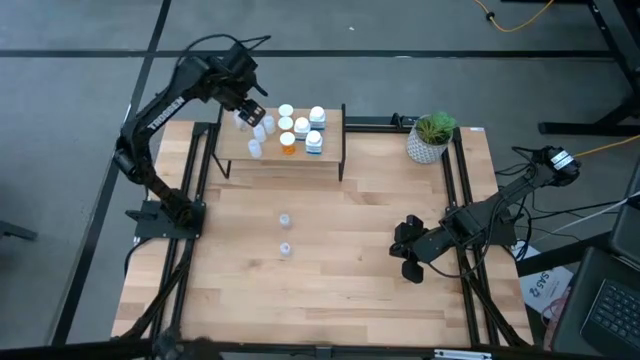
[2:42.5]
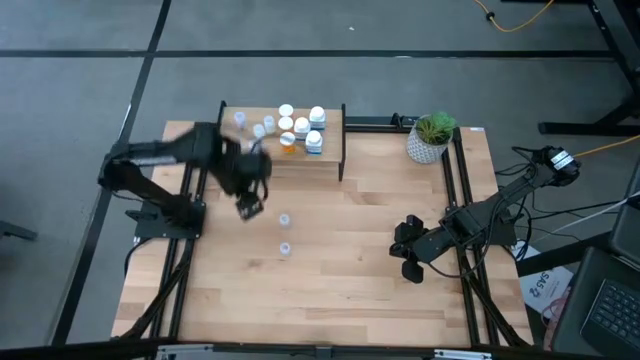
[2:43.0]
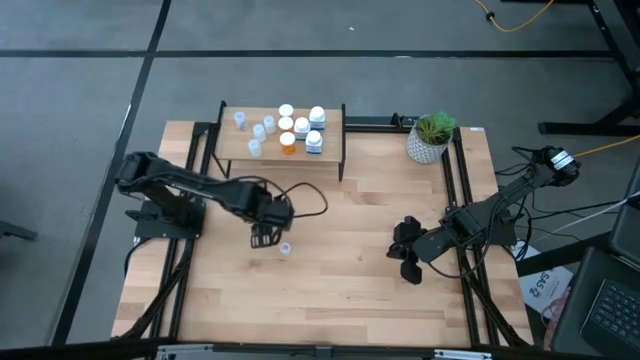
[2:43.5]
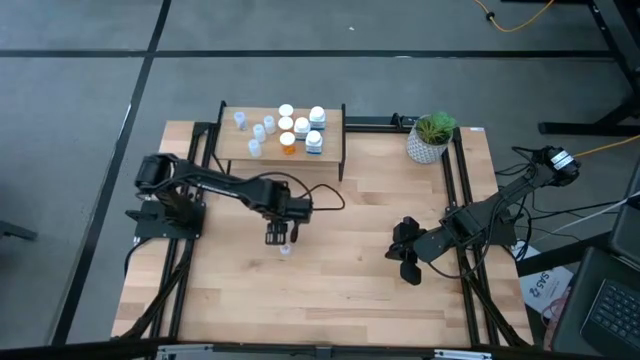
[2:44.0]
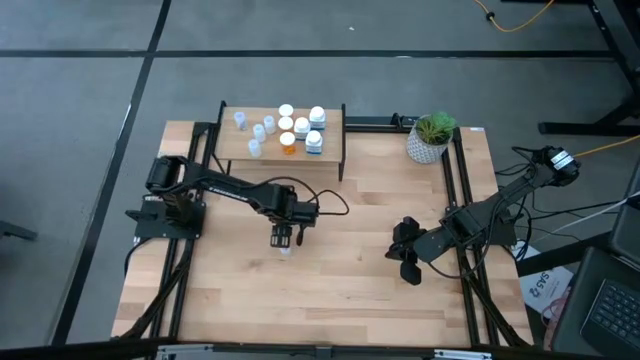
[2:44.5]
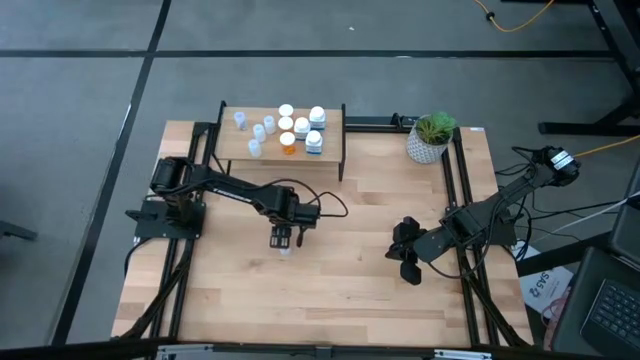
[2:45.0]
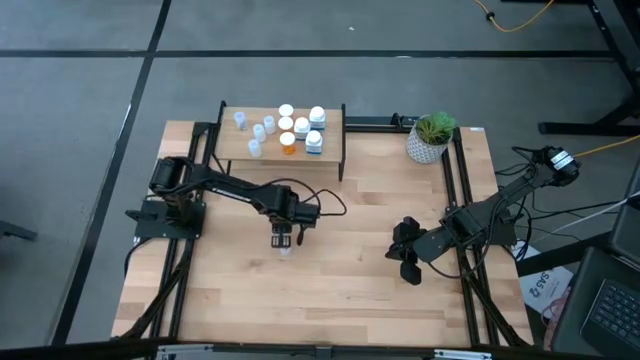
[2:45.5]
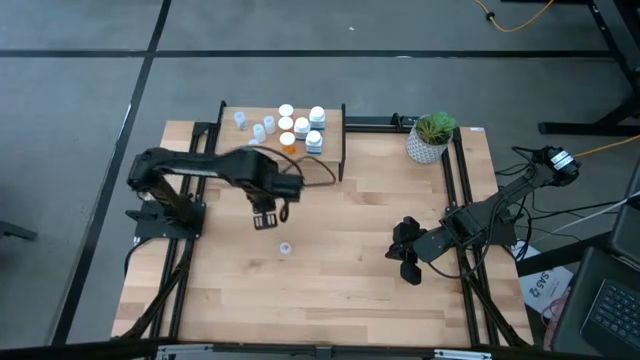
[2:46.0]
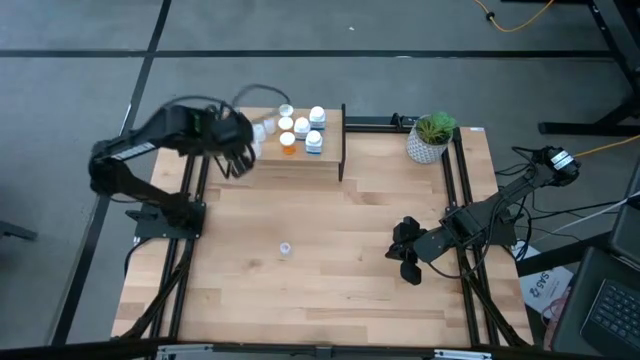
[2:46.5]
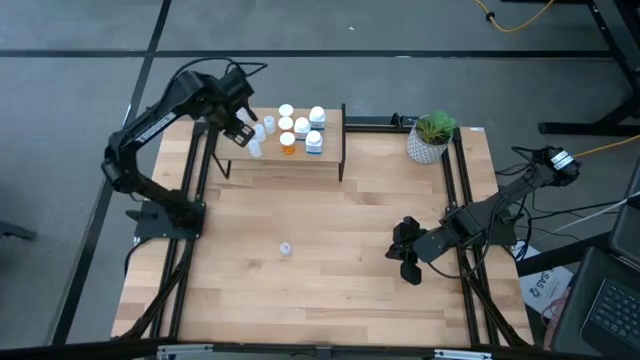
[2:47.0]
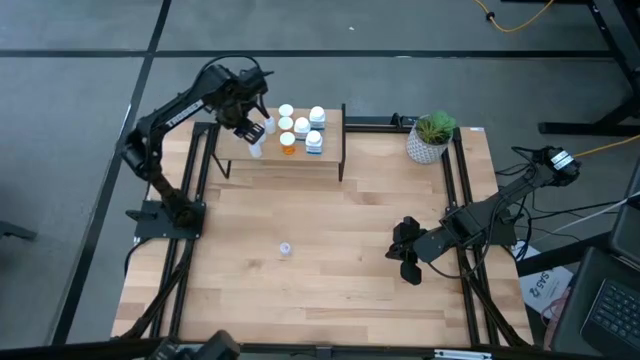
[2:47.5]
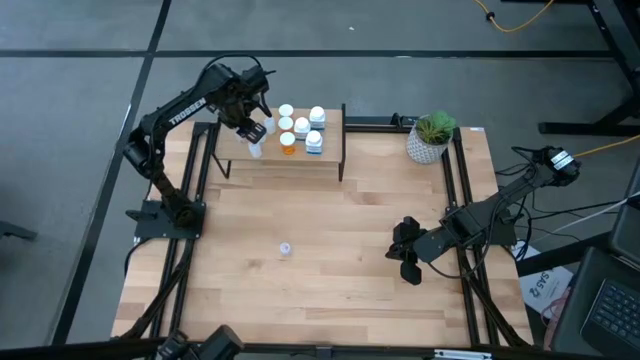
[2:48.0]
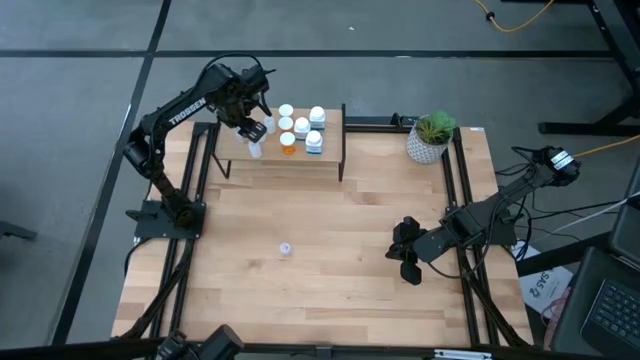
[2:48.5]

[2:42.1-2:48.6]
Task: Pick and place medicine bottles onto shelf by color
Put the transparent pill bottle on the shelf aligned with the transparent pill bottle

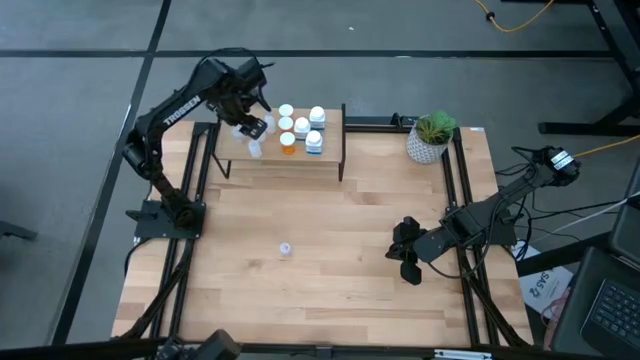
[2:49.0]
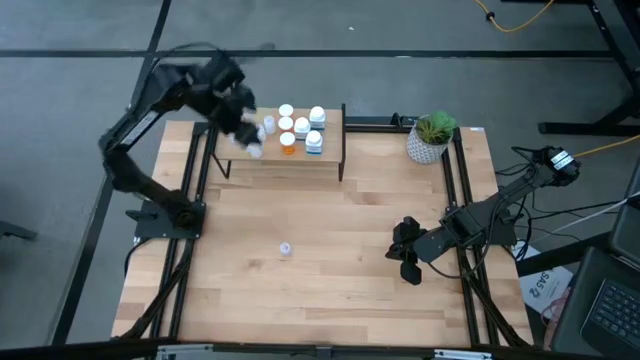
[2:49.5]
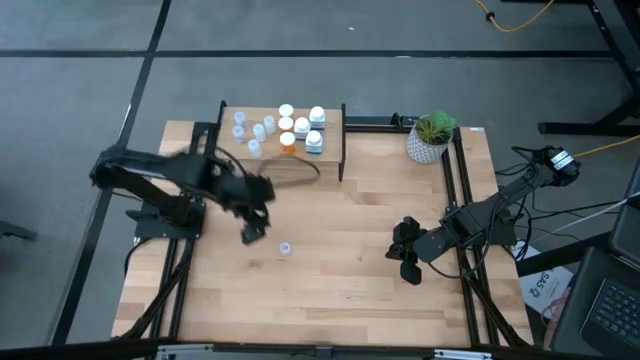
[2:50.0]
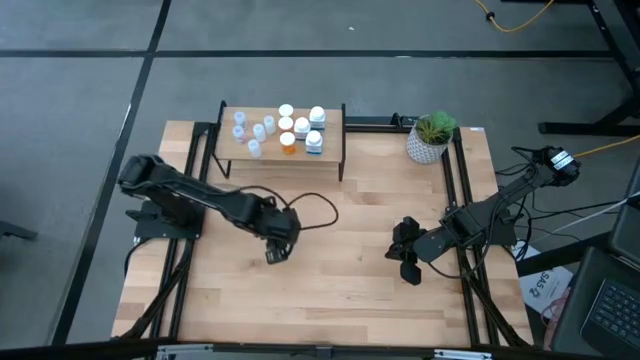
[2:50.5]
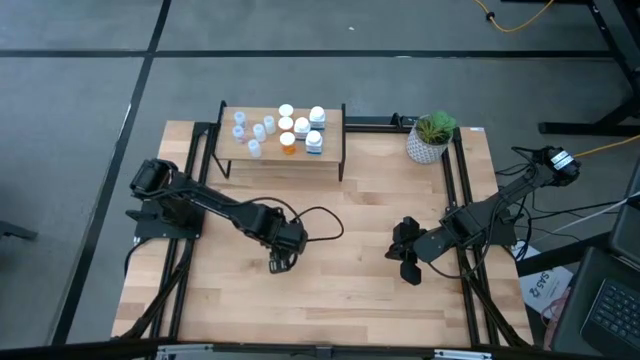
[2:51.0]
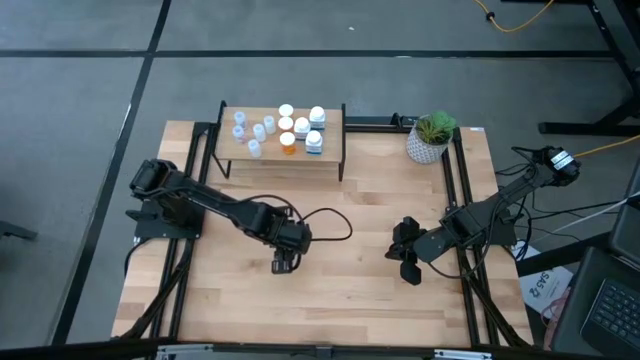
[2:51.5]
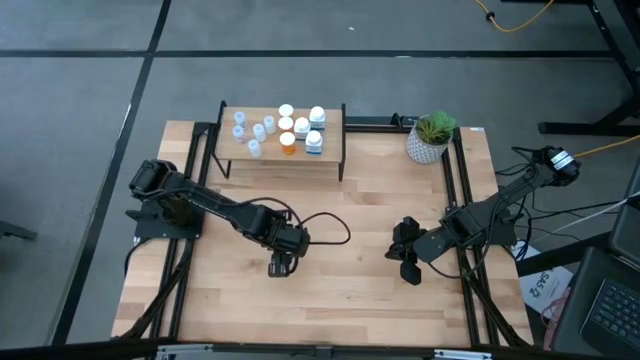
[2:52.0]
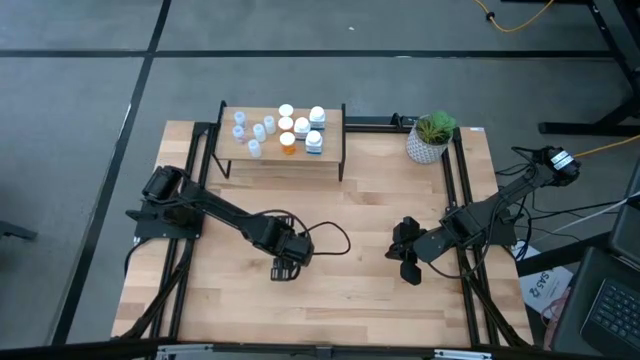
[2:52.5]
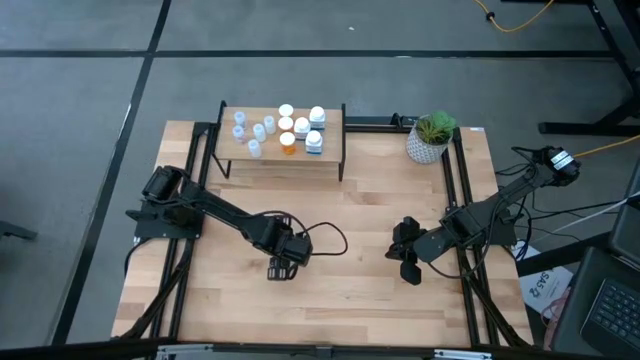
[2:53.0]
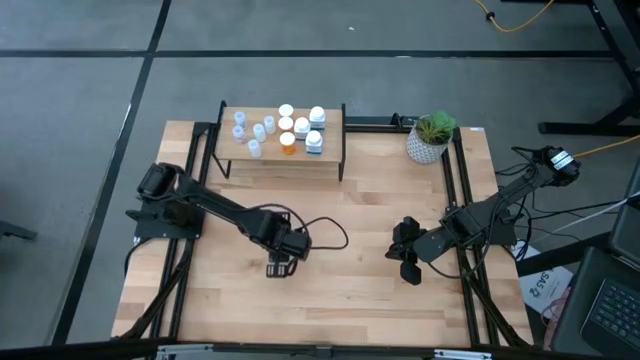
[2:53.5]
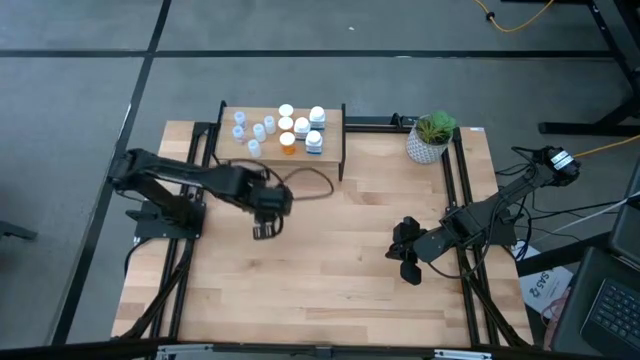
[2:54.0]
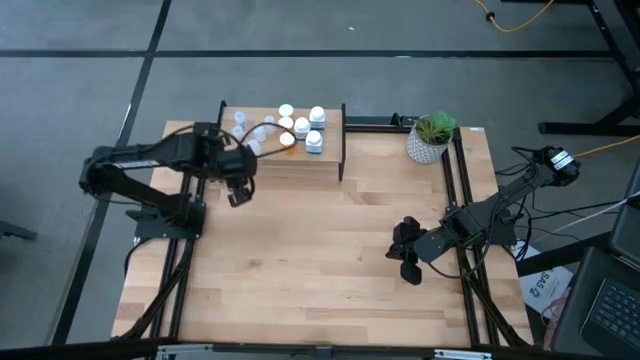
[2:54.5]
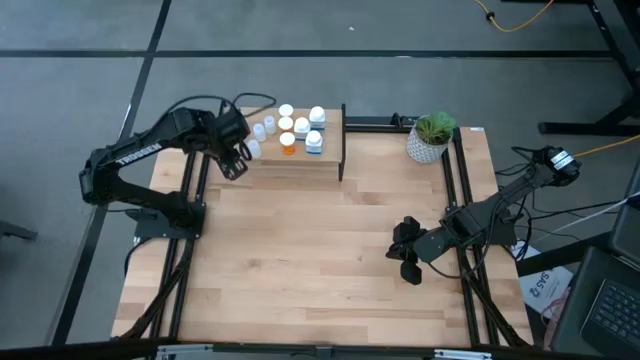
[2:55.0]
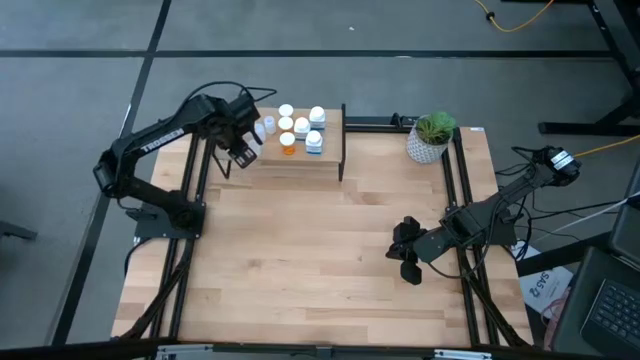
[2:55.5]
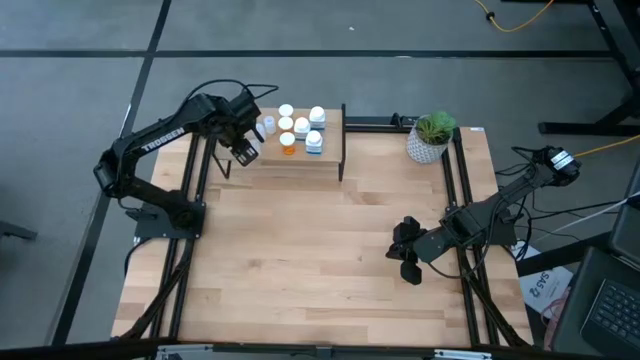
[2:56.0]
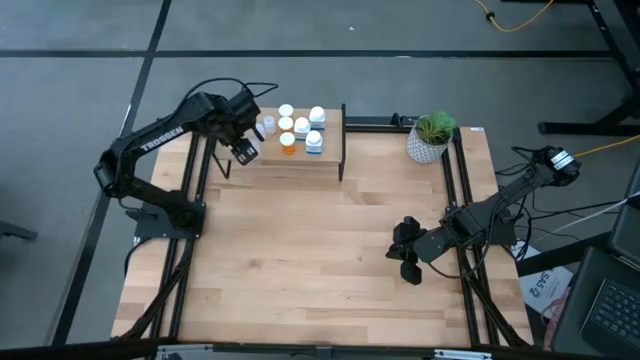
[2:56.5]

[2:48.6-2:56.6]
Put the transparent pill bottle on the shelf aligned with the transparent pill bottles

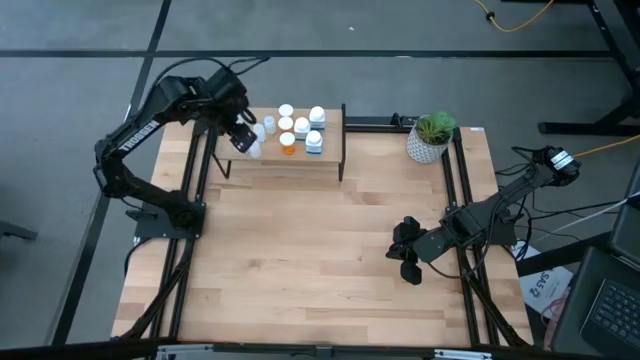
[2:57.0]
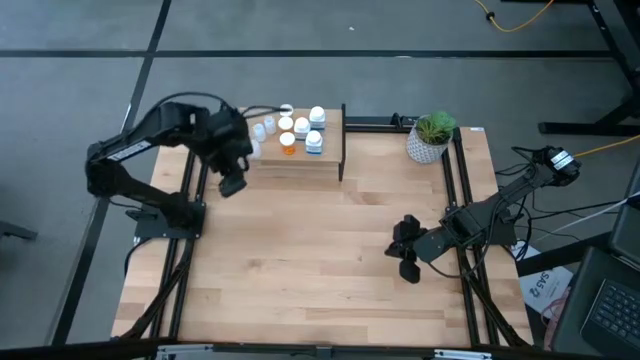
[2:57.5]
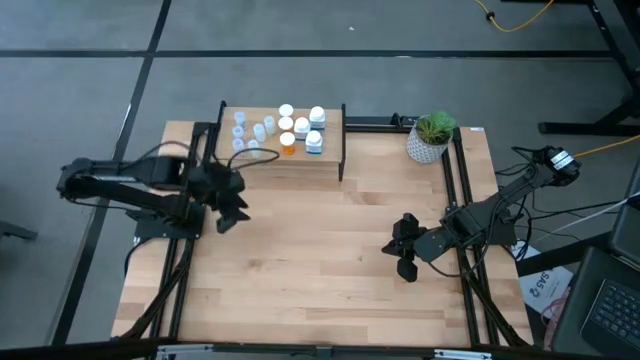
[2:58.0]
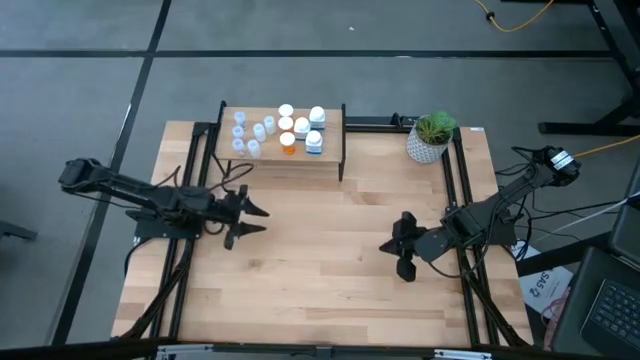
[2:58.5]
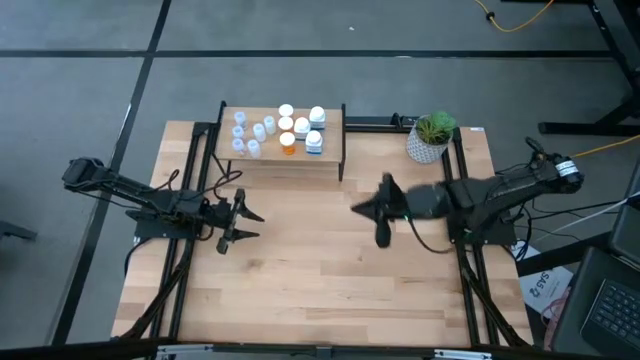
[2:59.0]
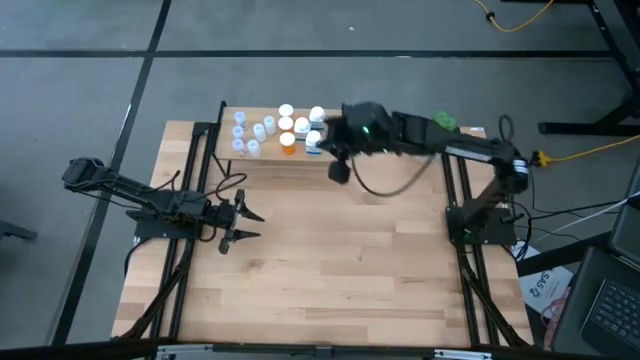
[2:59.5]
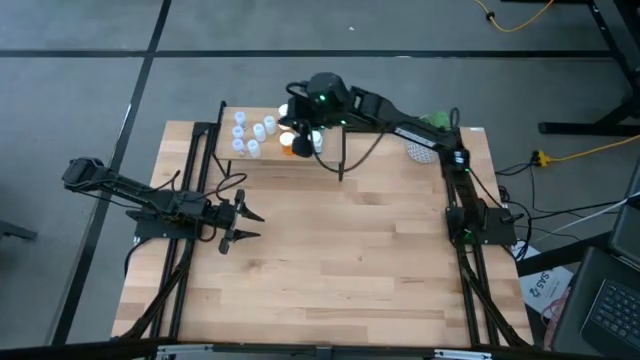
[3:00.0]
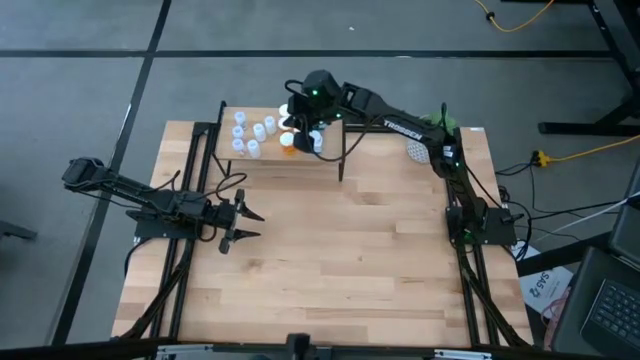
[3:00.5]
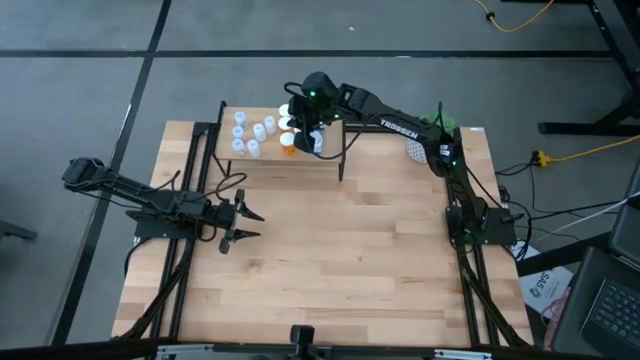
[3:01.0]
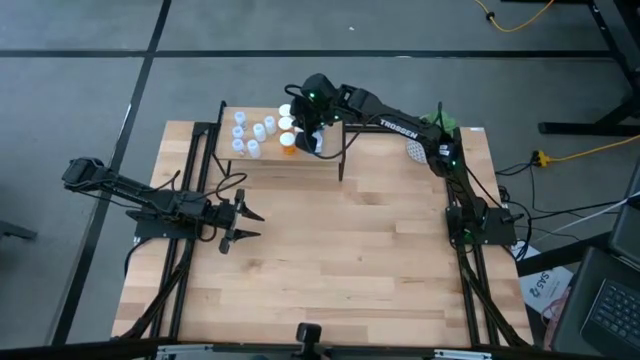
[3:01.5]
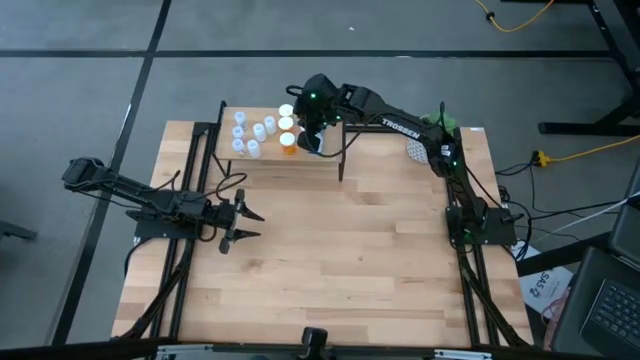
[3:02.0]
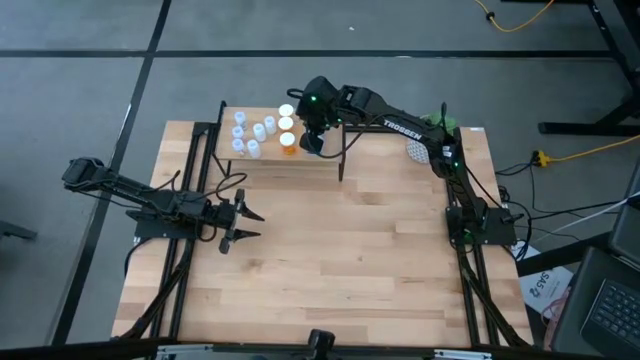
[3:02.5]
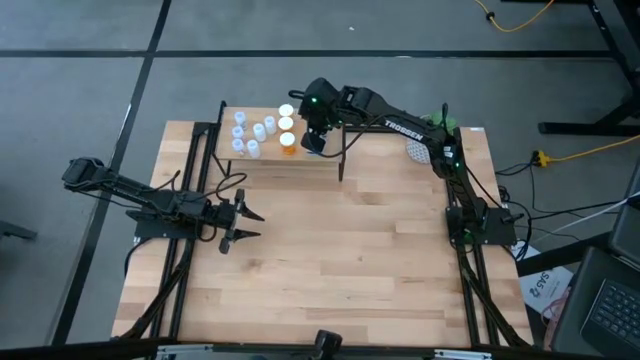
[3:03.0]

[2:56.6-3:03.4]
Adjust the blue pill bottle
